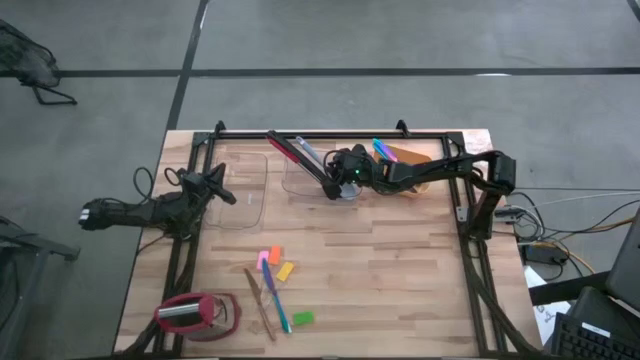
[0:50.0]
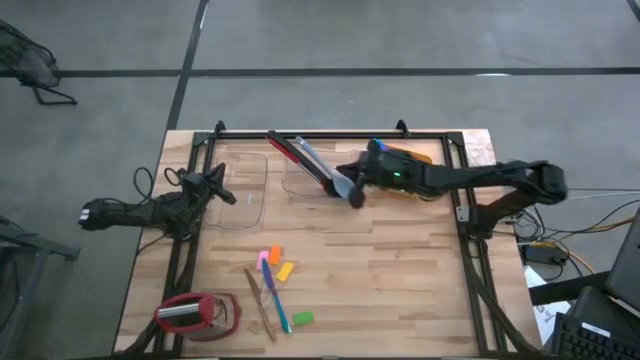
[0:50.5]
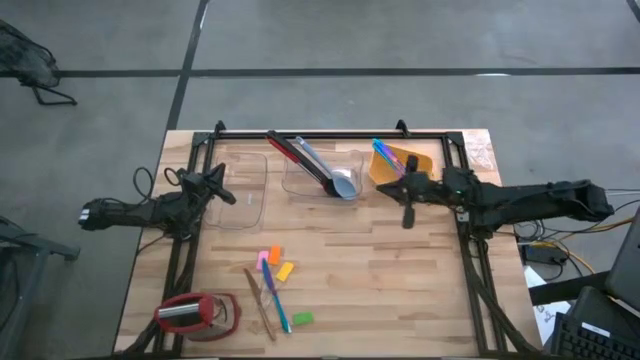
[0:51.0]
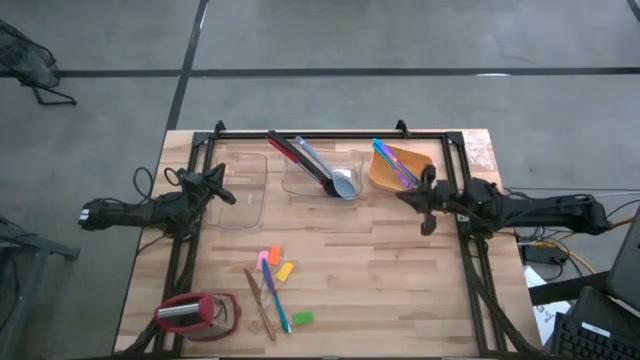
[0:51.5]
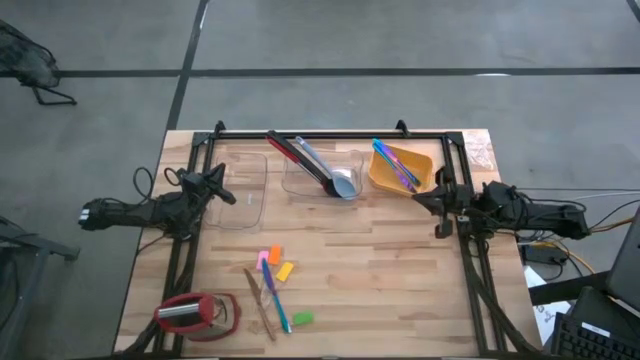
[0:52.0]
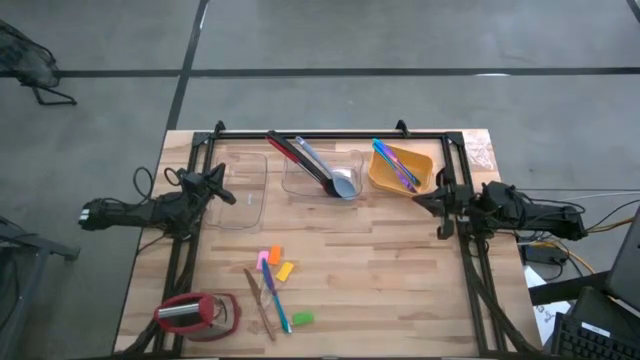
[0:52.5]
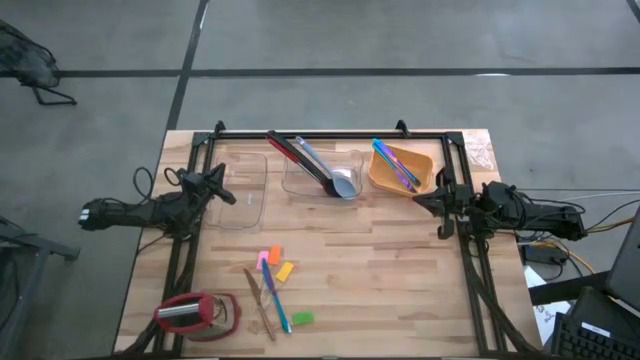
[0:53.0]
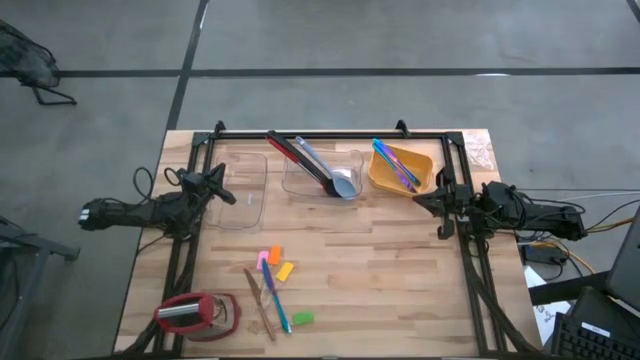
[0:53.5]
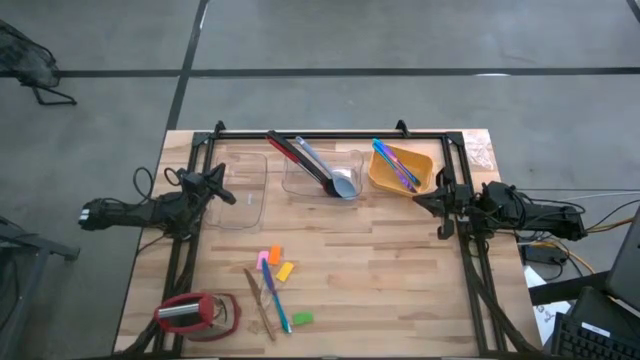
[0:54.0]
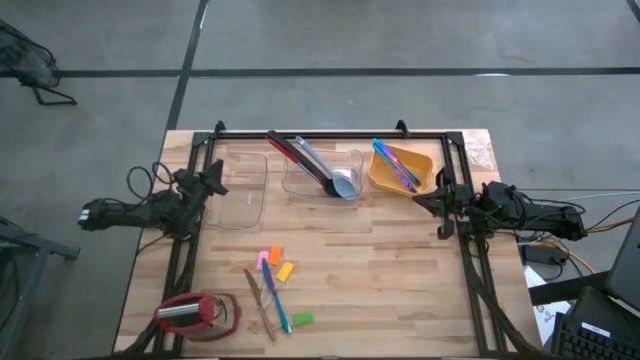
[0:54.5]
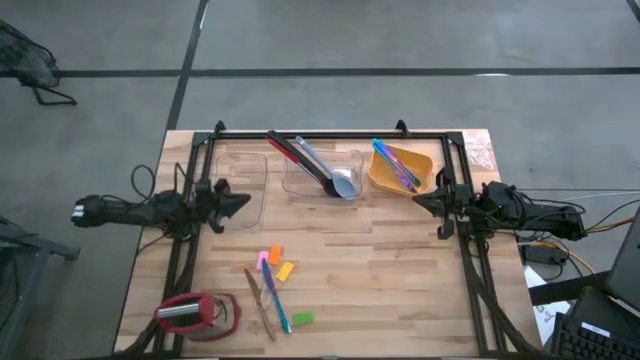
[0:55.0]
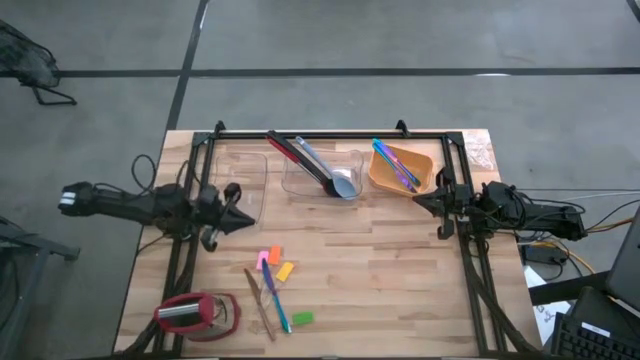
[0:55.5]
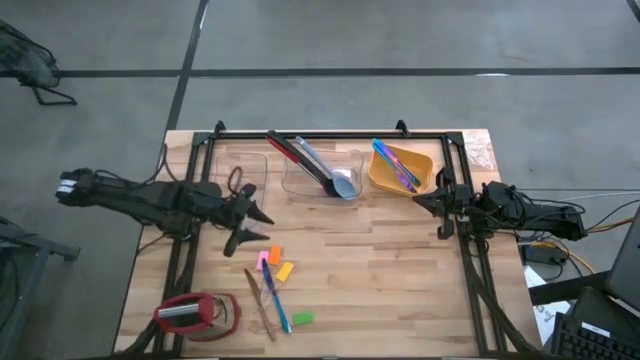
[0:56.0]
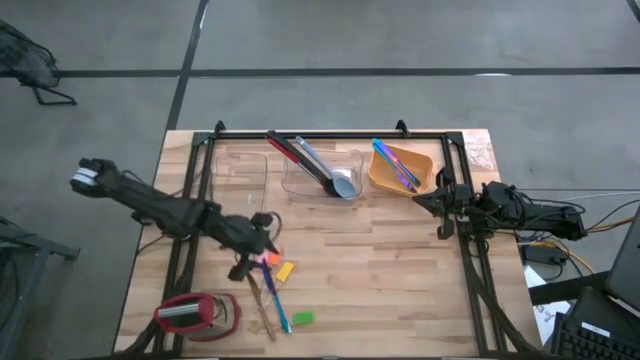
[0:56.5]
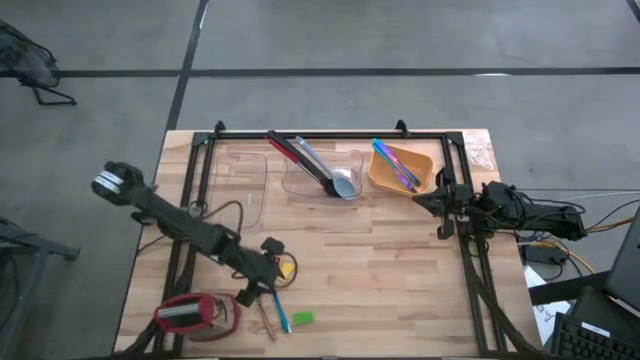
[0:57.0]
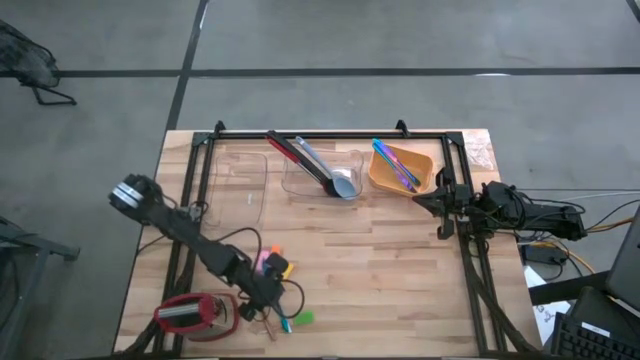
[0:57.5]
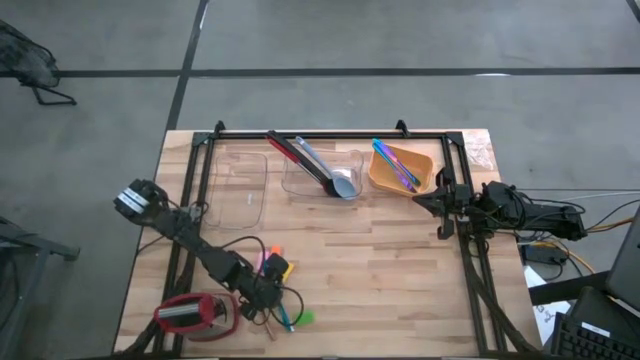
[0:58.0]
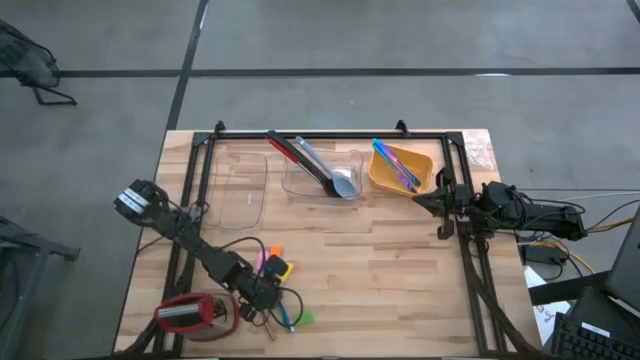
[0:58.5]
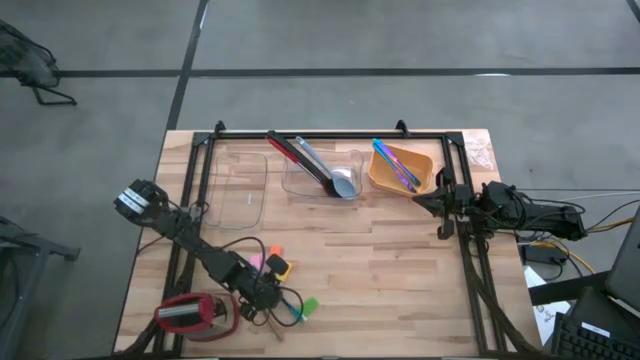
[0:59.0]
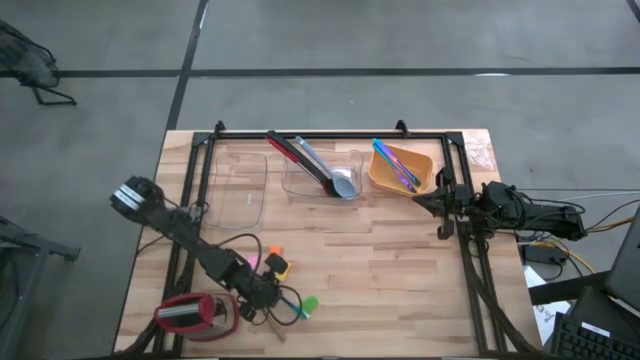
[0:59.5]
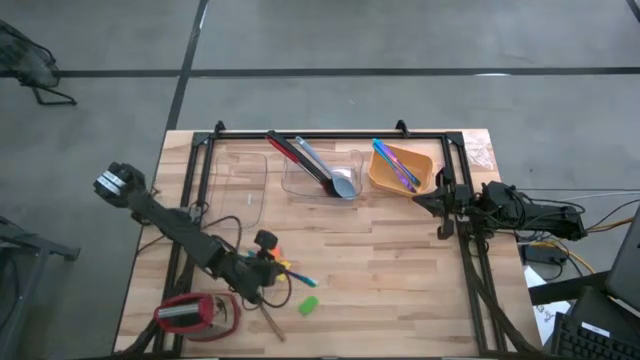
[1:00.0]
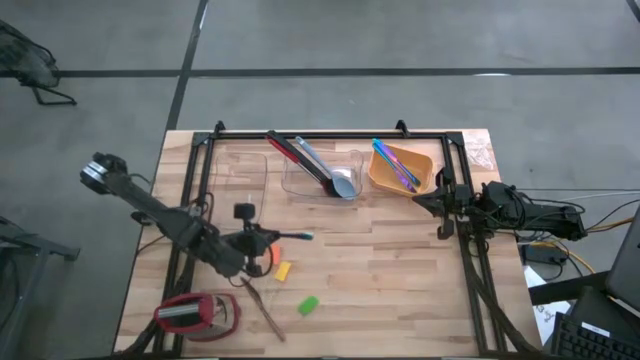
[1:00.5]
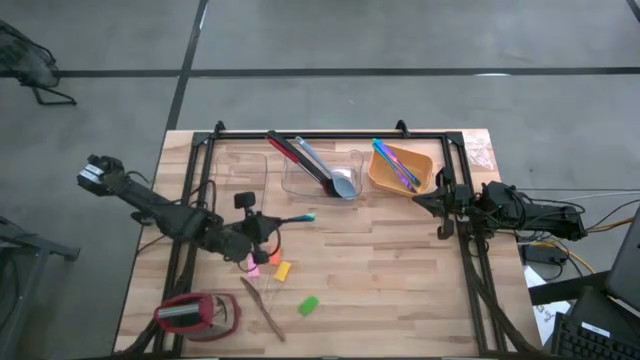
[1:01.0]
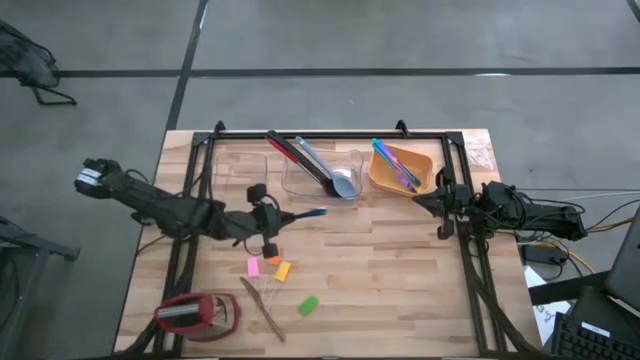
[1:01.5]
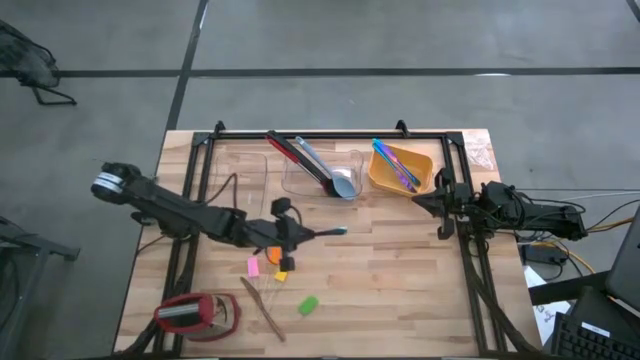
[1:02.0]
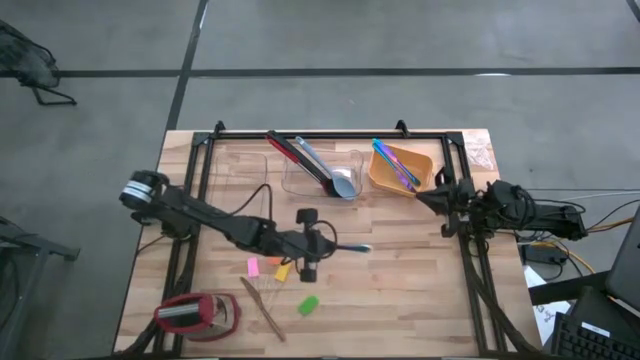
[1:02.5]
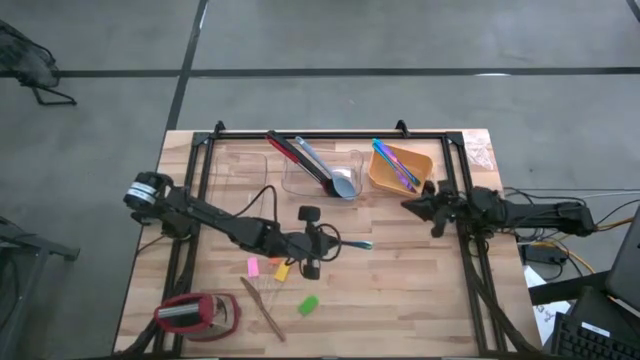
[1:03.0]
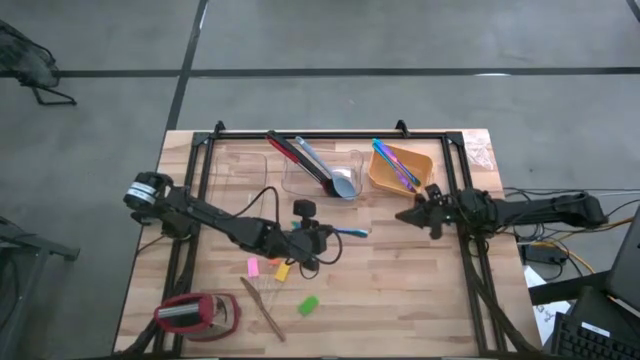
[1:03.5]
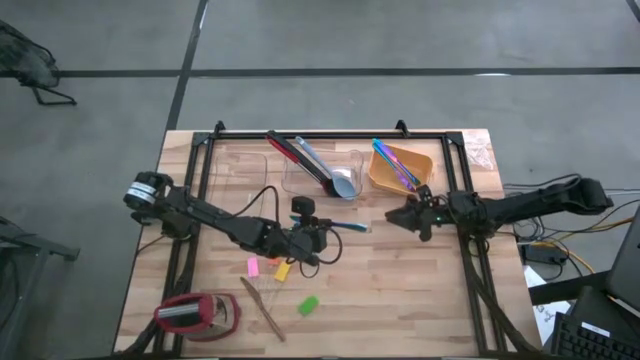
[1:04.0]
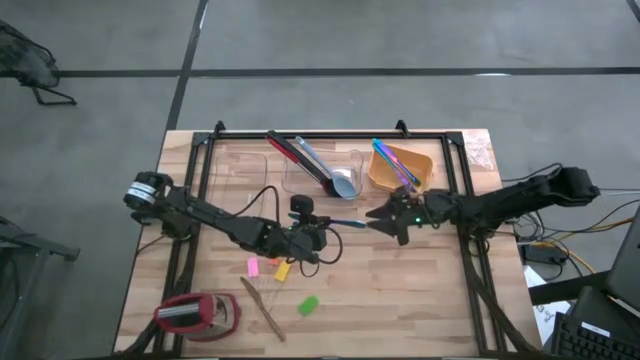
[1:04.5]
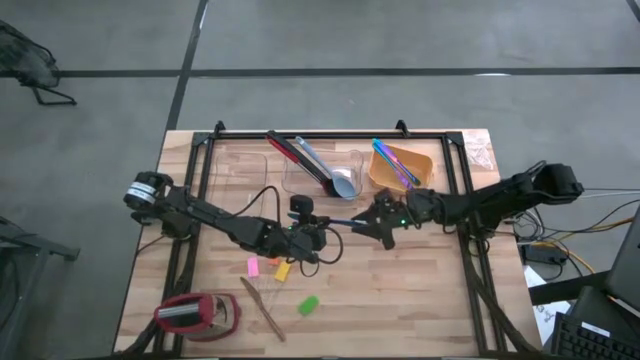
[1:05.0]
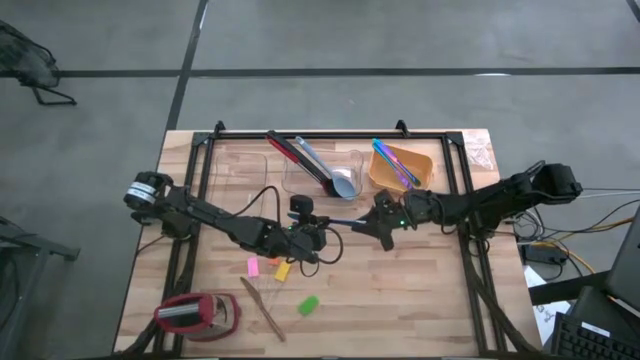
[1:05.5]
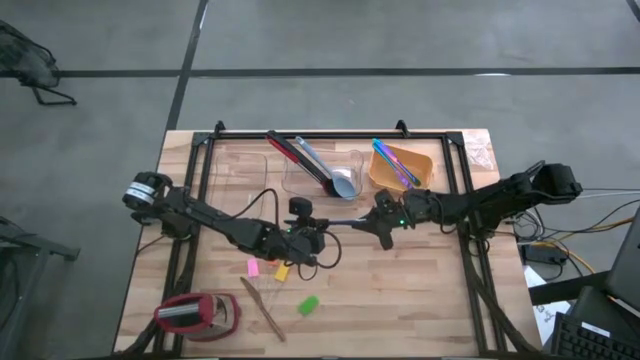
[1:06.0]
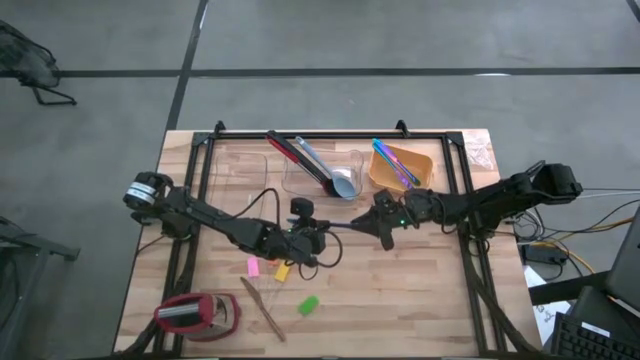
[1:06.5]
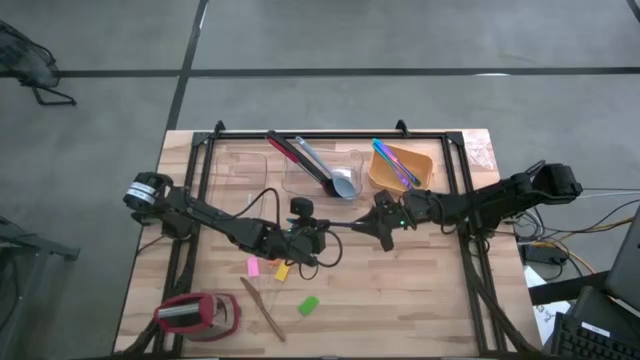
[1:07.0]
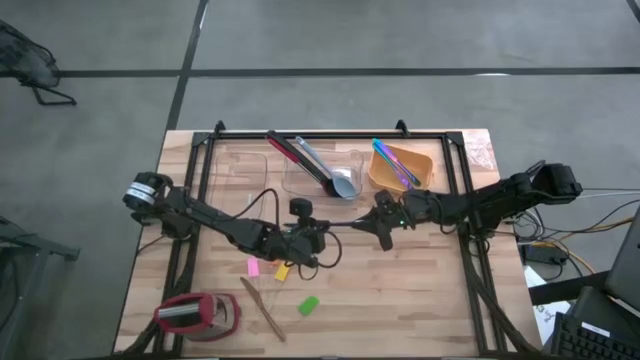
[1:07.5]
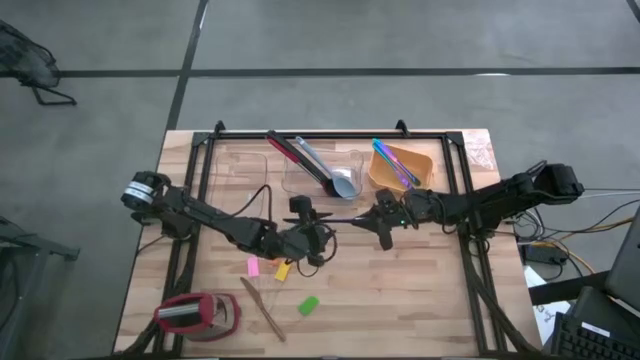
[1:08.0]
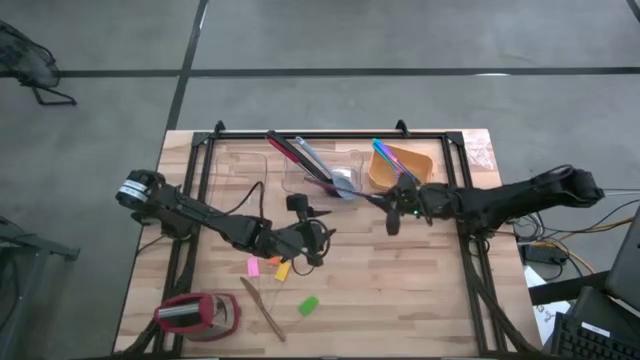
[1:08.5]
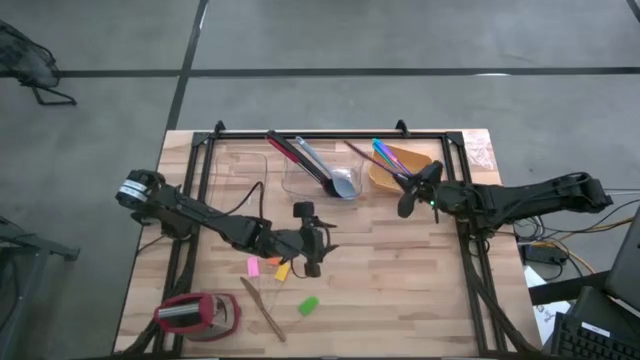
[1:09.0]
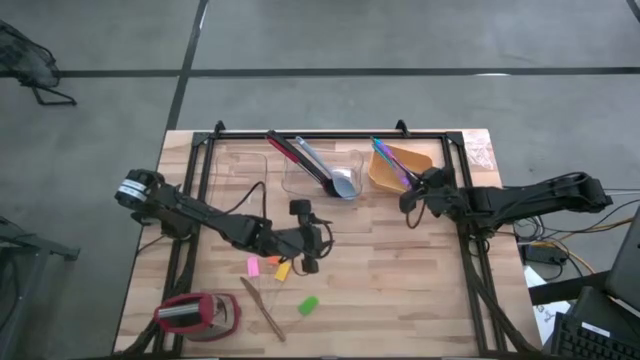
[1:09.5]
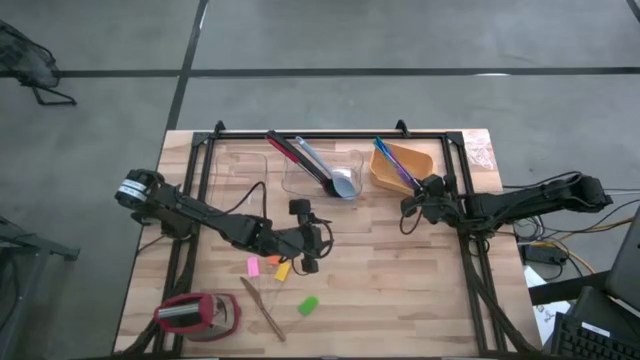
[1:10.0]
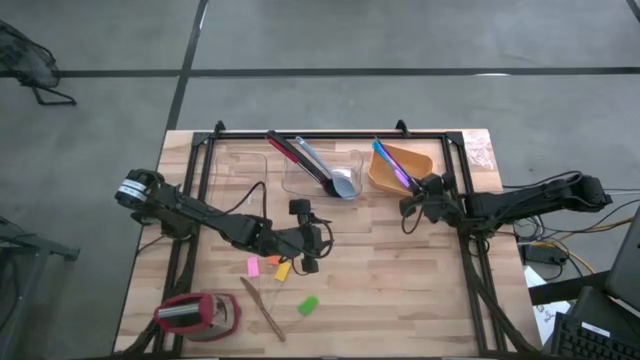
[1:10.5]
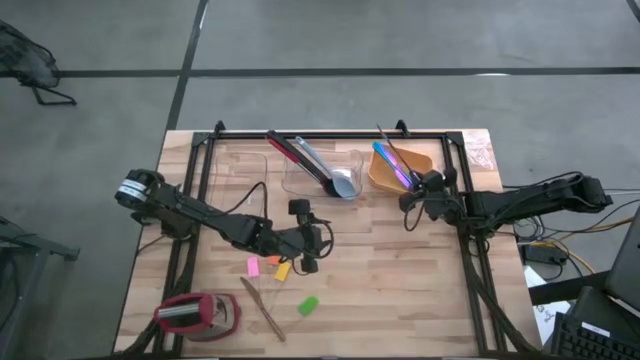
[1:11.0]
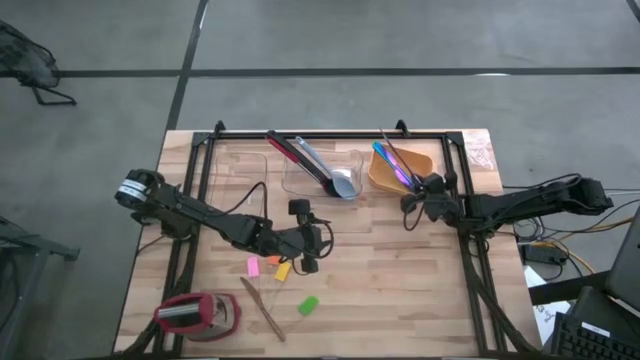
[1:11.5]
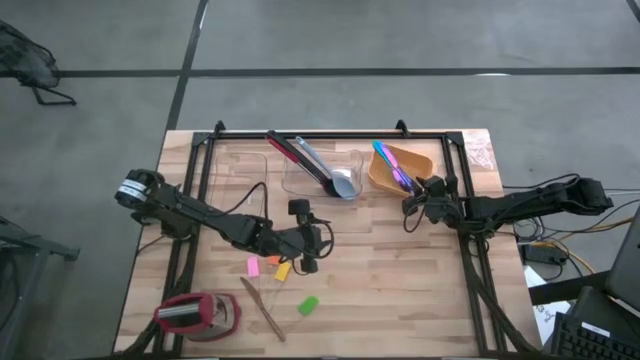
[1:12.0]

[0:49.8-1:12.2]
Task: Sort silverware by color (type)
Put the iridescent knife into the yellow bin
